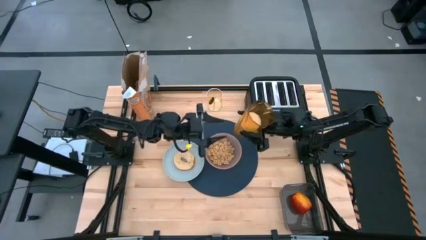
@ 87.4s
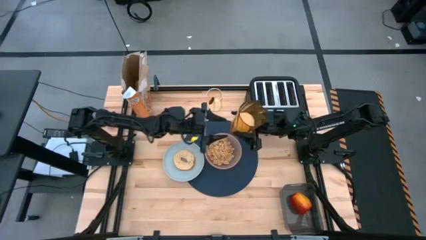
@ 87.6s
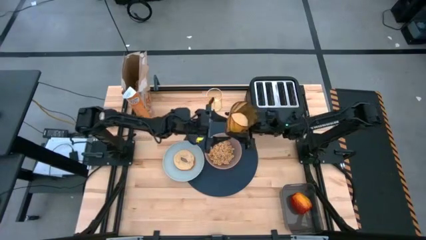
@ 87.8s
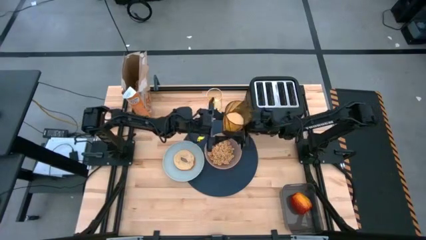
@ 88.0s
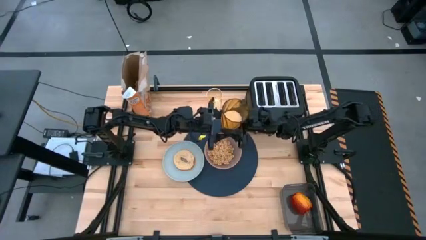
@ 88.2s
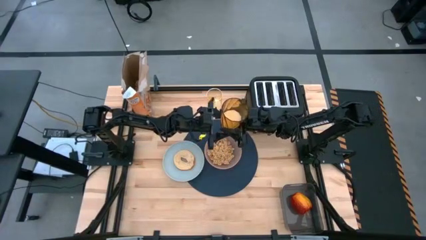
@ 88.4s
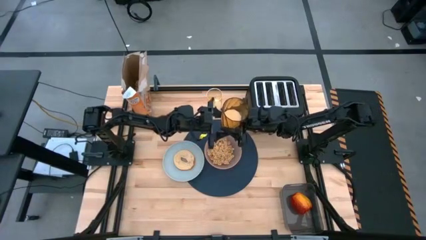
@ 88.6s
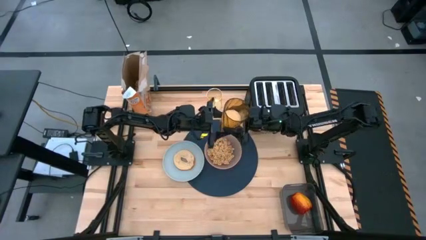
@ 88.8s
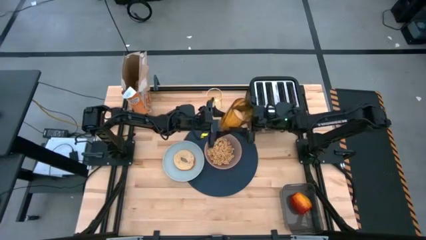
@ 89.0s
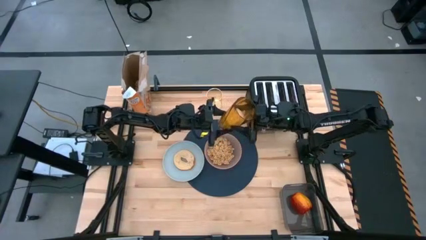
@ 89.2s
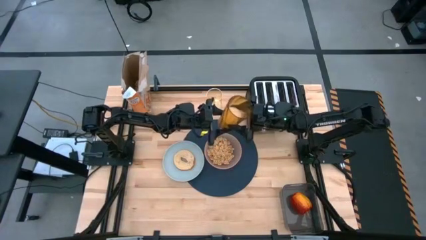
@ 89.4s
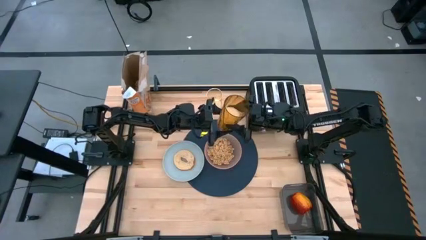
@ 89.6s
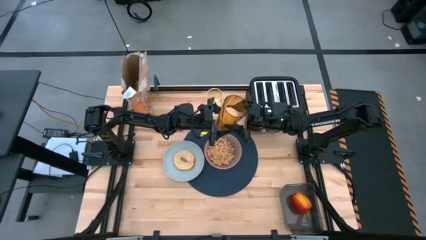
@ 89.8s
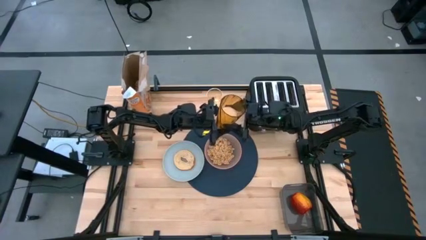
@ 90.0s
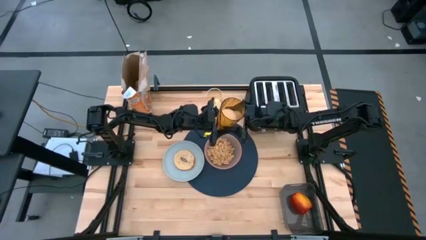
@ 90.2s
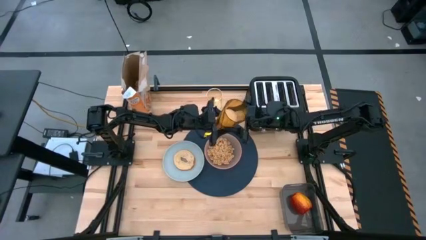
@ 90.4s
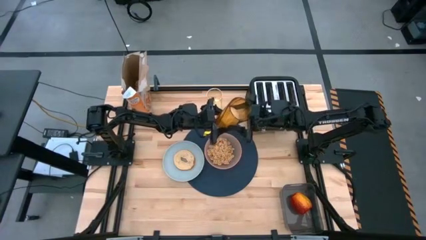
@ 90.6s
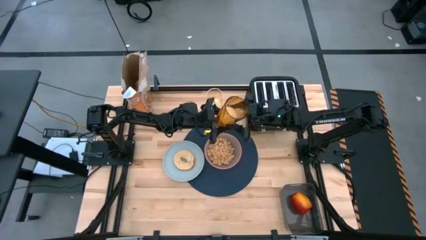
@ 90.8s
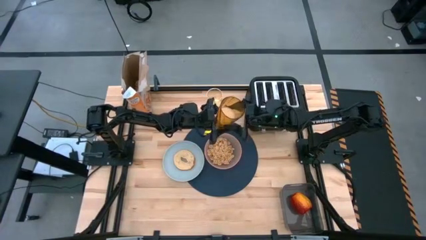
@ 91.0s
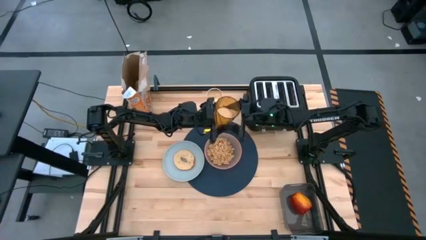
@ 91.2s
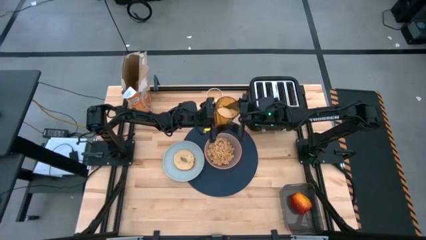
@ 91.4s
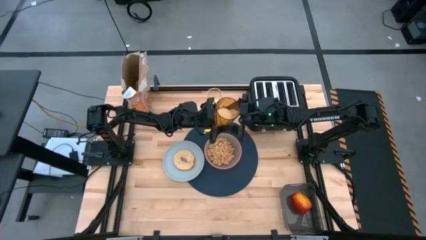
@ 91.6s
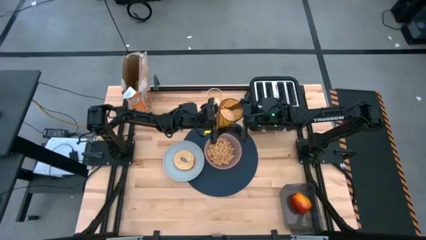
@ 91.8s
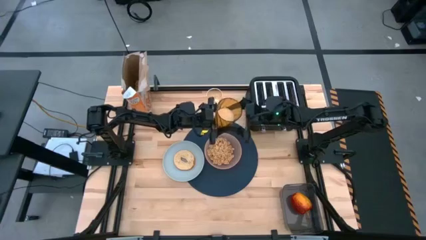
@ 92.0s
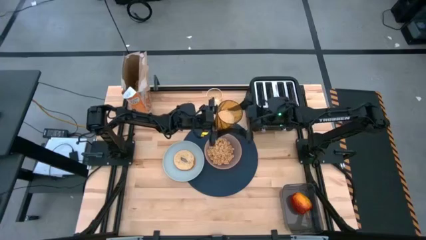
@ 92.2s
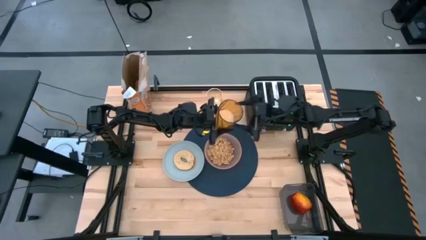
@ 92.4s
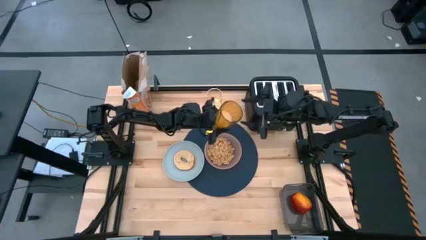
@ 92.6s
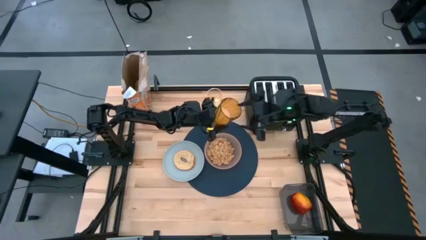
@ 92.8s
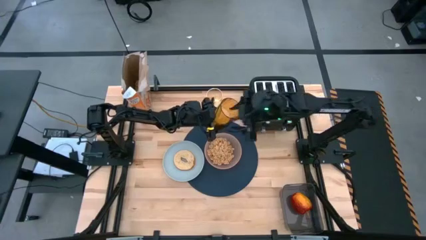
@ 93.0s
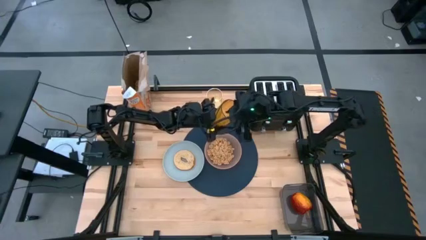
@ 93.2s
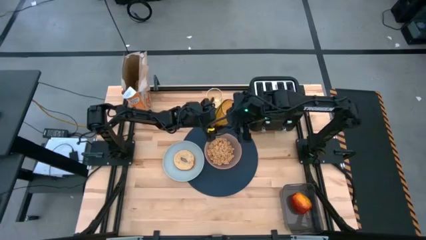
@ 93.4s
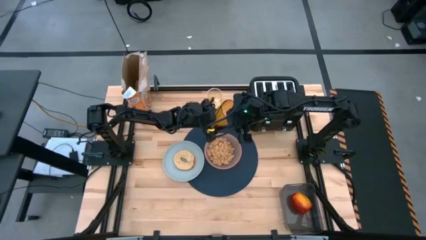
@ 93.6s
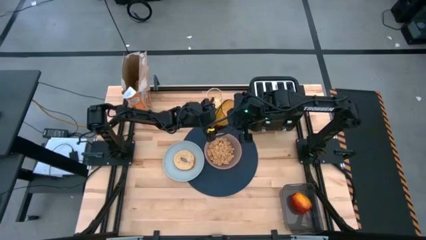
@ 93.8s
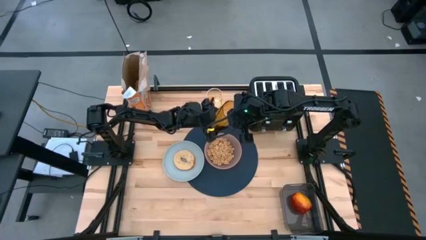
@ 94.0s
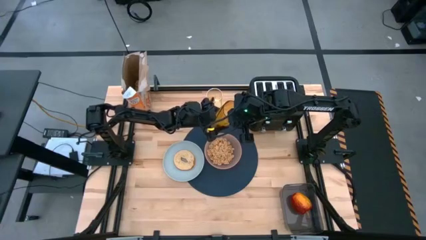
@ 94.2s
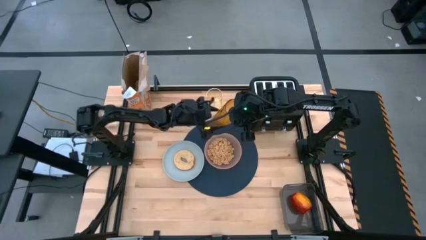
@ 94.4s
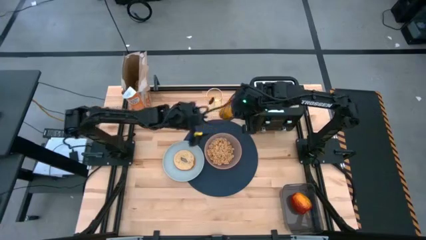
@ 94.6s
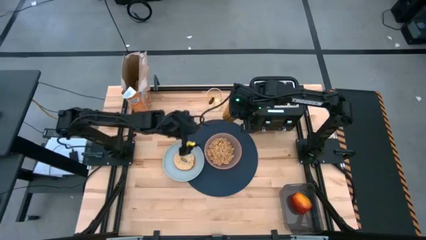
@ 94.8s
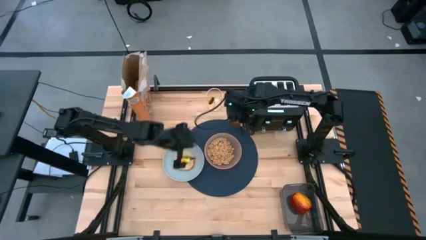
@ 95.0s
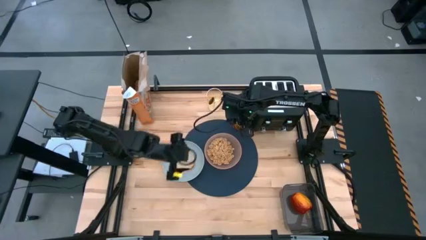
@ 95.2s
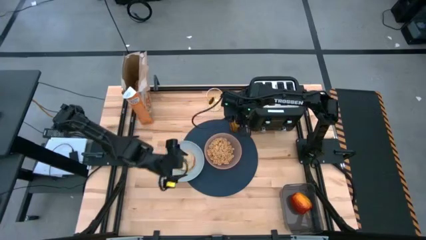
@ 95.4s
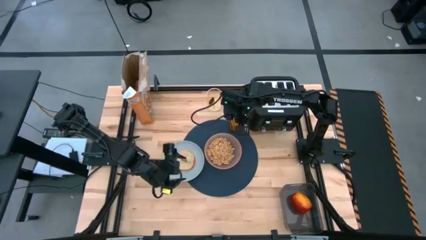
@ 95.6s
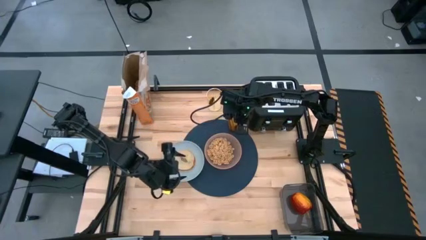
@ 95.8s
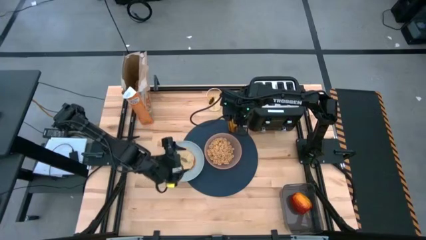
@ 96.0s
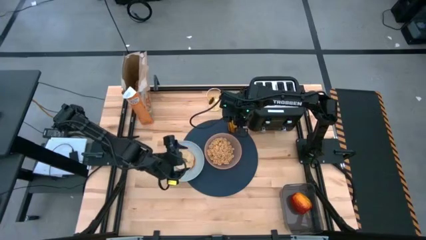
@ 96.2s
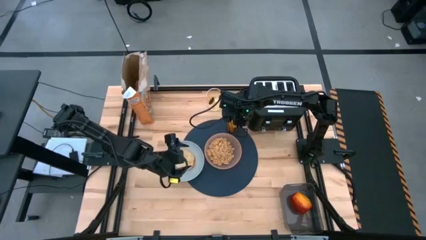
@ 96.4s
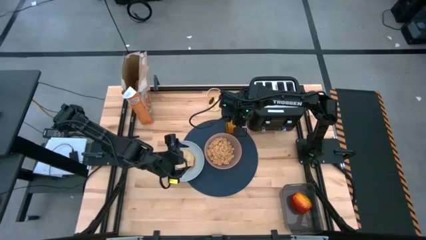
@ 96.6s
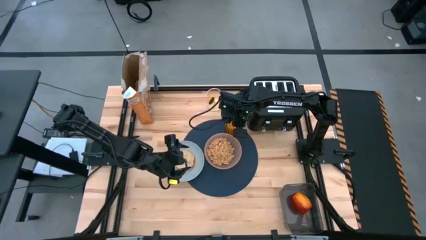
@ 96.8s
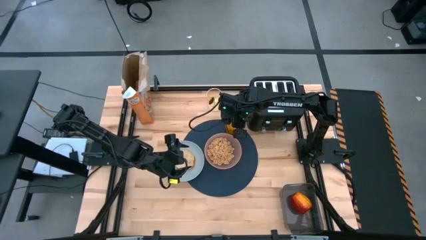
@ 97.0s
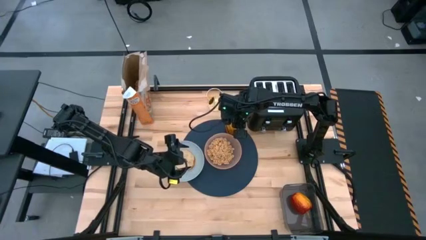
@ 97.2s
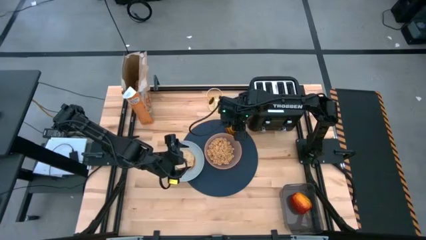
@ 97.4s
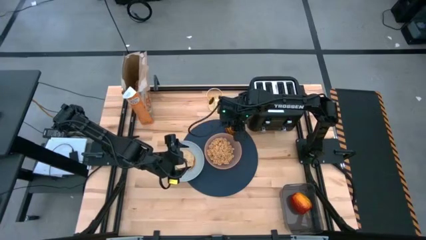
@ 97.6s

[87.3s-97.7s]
Task: Arrange a breakfast setting
Put the yellow cup on the top right of the orange bowl
